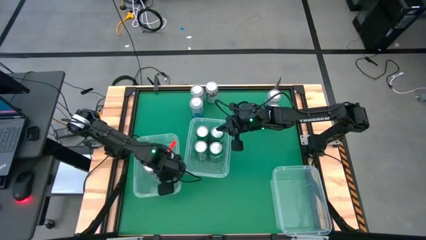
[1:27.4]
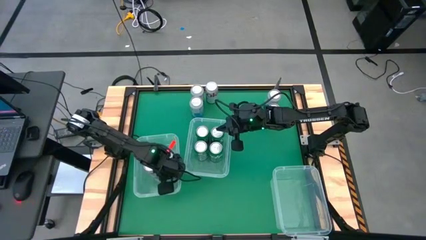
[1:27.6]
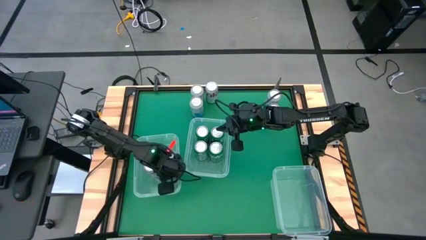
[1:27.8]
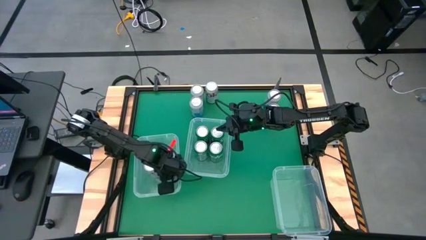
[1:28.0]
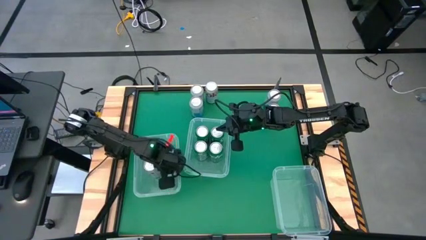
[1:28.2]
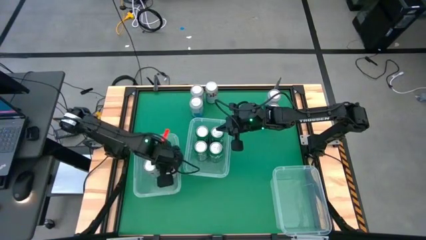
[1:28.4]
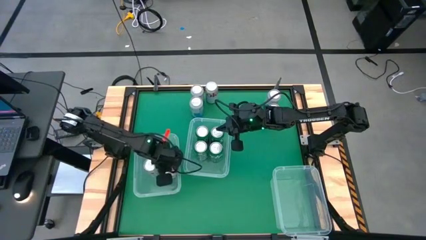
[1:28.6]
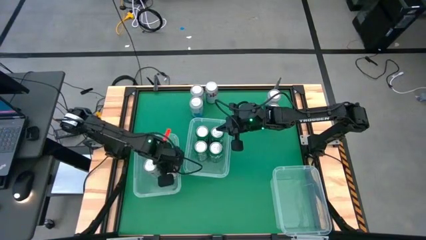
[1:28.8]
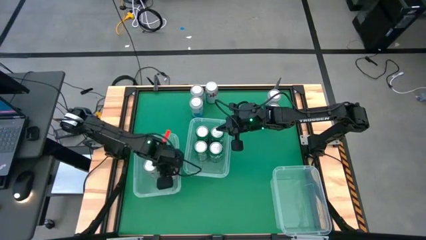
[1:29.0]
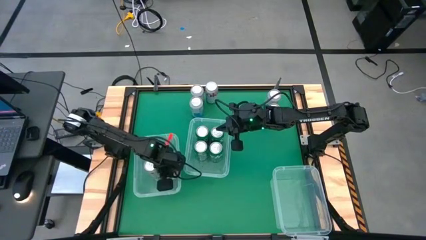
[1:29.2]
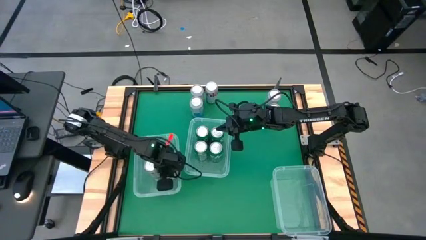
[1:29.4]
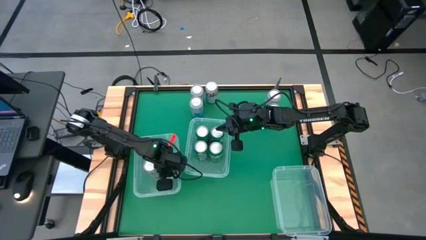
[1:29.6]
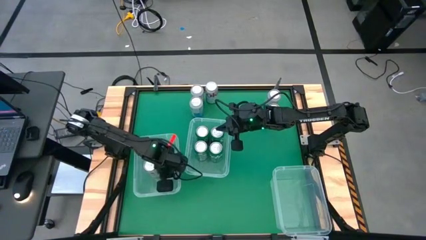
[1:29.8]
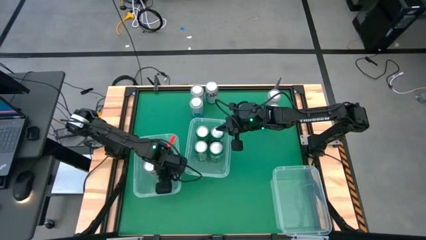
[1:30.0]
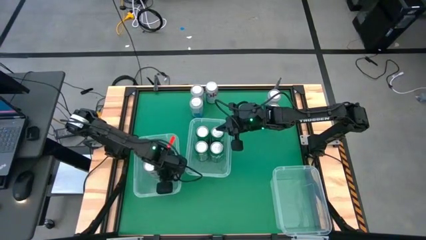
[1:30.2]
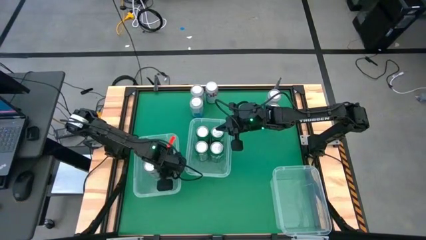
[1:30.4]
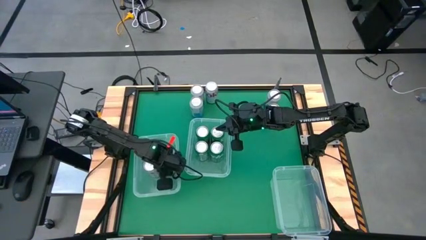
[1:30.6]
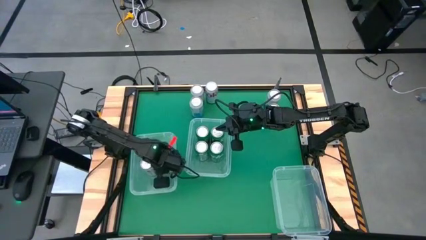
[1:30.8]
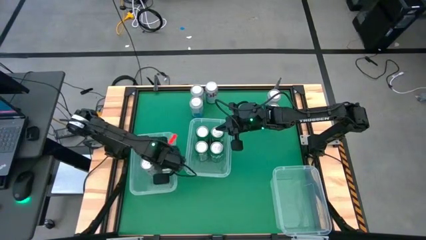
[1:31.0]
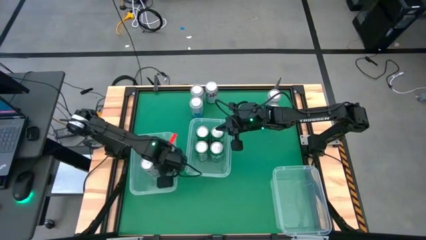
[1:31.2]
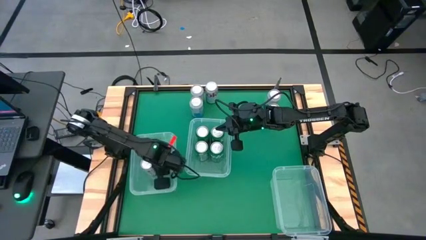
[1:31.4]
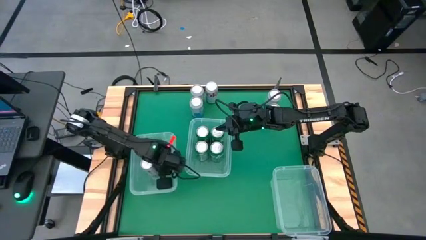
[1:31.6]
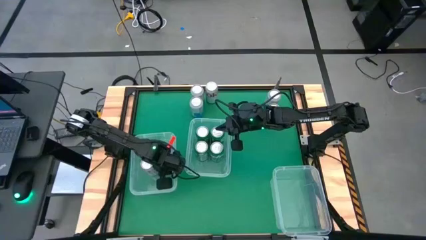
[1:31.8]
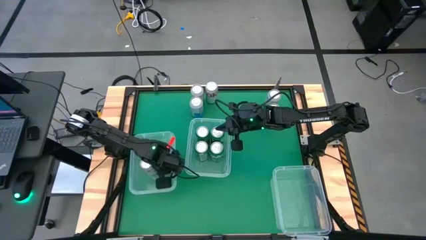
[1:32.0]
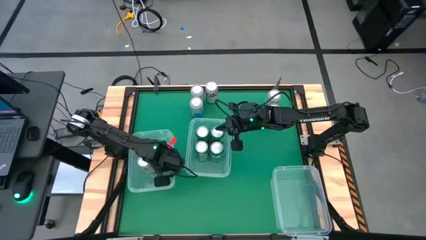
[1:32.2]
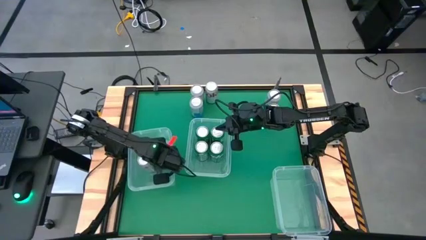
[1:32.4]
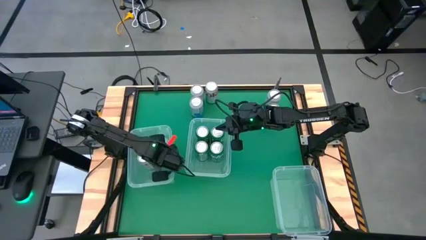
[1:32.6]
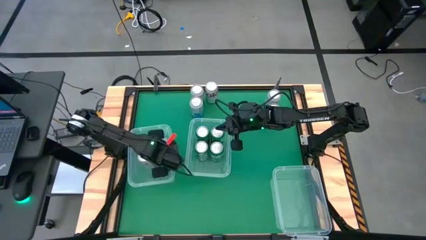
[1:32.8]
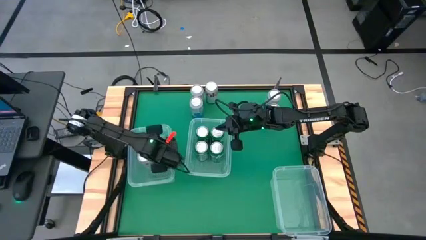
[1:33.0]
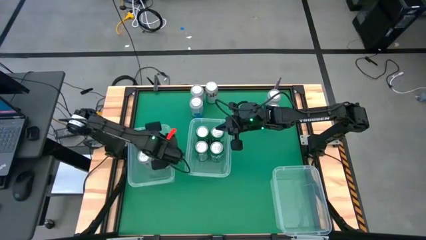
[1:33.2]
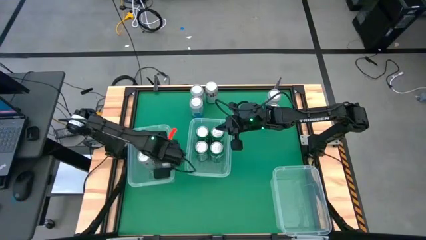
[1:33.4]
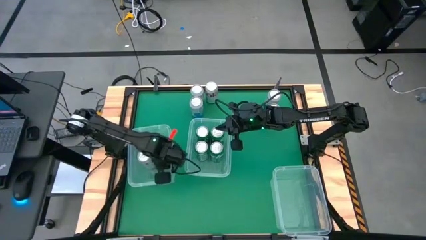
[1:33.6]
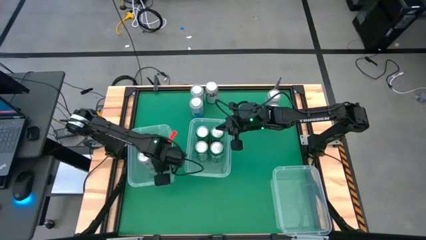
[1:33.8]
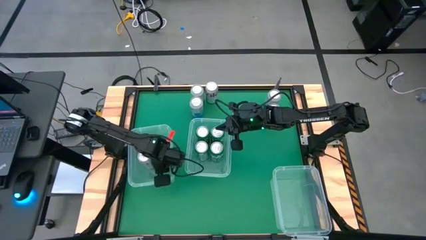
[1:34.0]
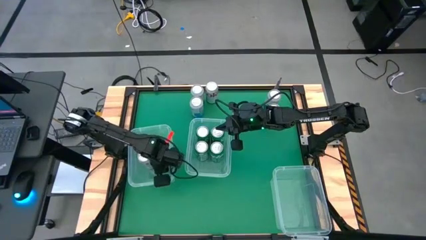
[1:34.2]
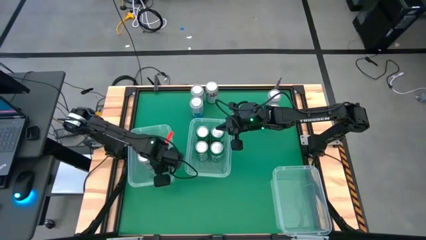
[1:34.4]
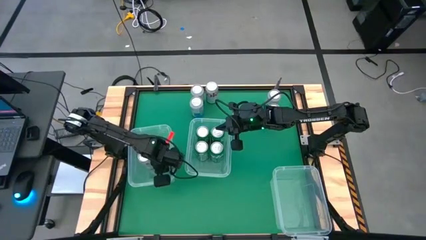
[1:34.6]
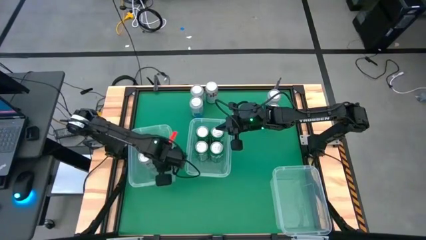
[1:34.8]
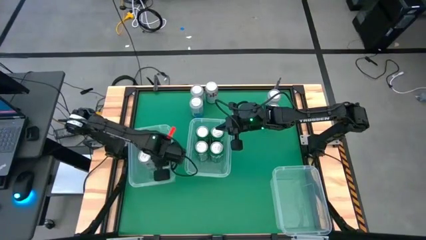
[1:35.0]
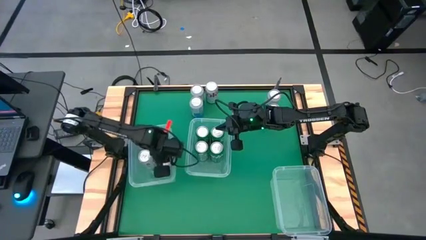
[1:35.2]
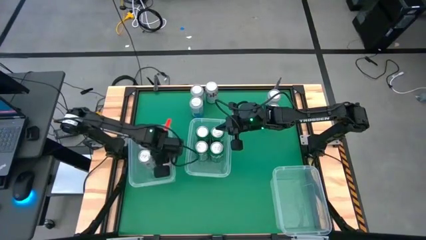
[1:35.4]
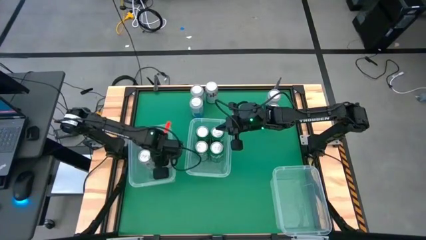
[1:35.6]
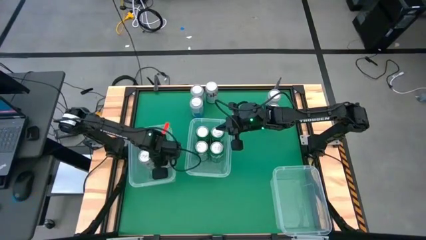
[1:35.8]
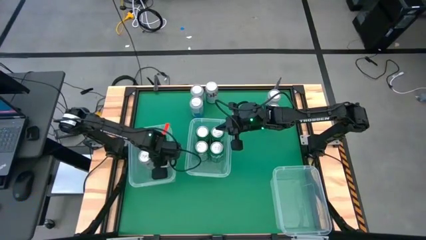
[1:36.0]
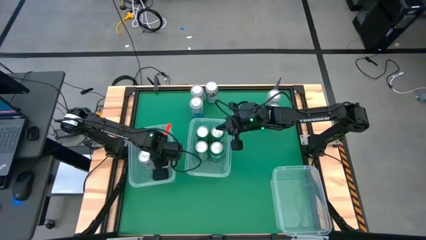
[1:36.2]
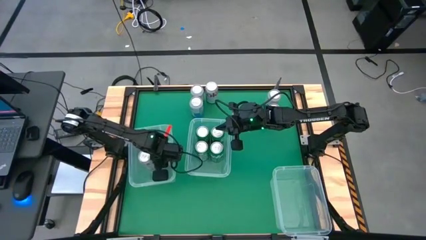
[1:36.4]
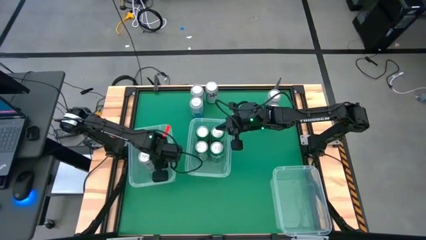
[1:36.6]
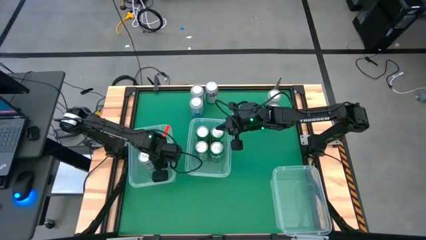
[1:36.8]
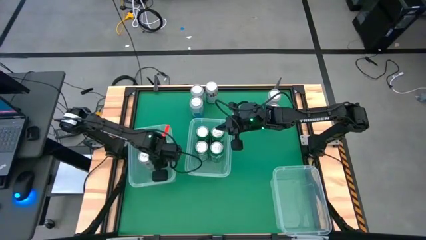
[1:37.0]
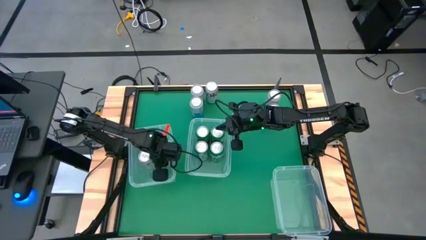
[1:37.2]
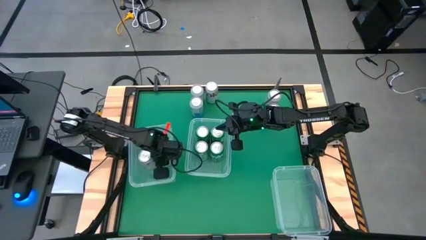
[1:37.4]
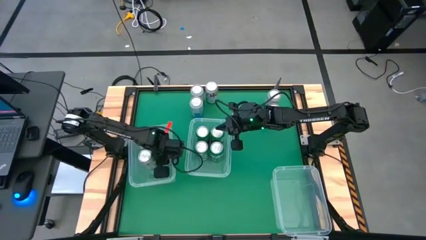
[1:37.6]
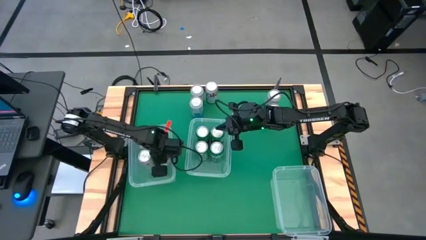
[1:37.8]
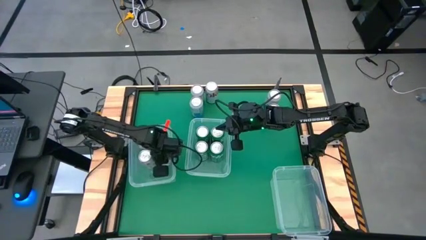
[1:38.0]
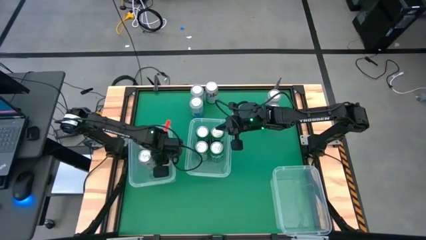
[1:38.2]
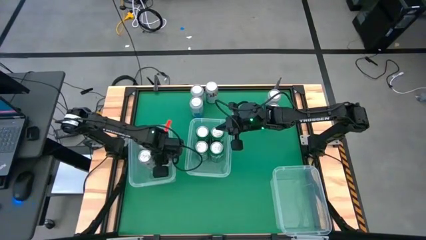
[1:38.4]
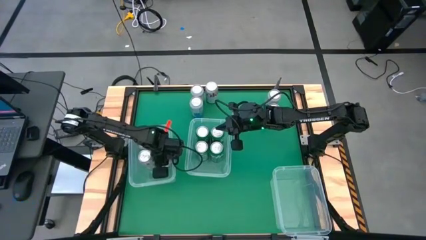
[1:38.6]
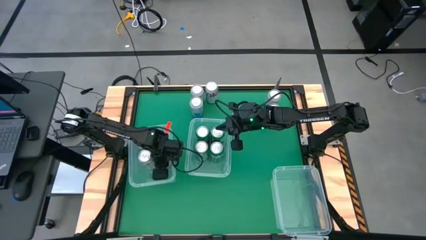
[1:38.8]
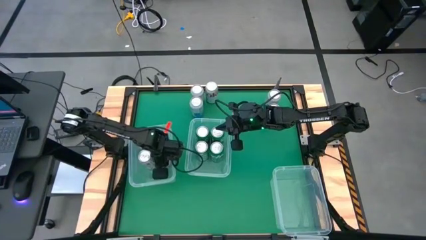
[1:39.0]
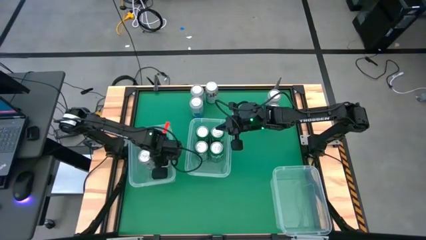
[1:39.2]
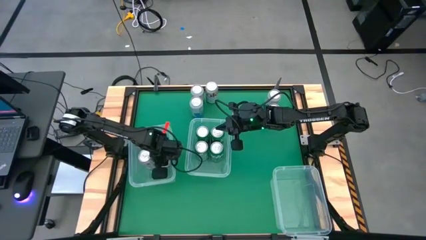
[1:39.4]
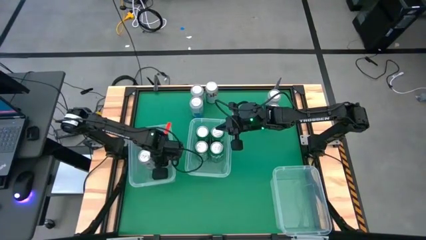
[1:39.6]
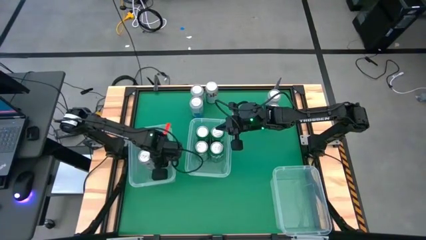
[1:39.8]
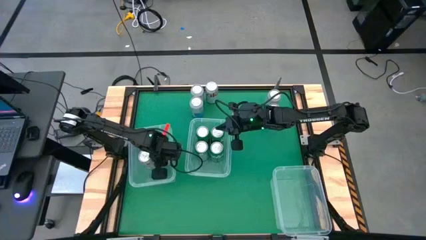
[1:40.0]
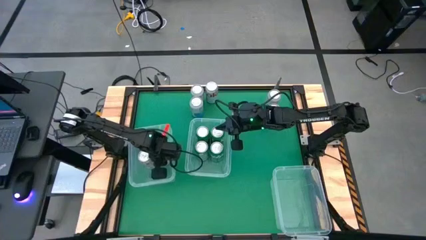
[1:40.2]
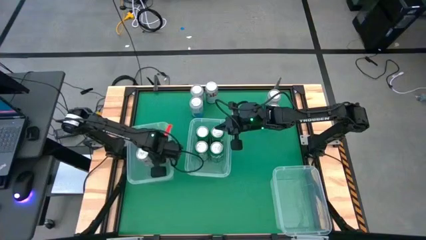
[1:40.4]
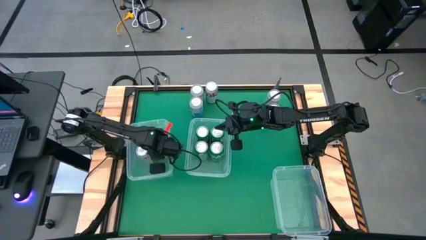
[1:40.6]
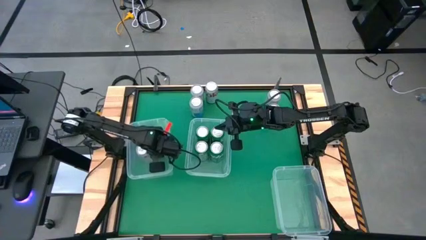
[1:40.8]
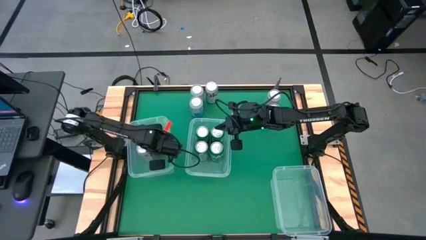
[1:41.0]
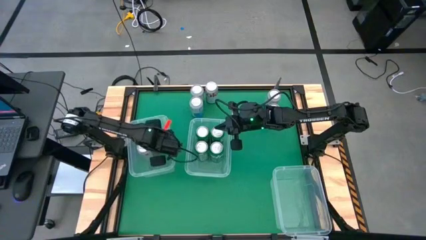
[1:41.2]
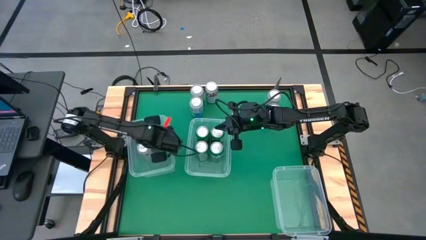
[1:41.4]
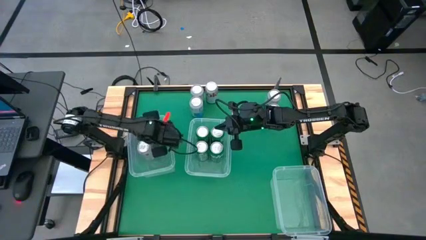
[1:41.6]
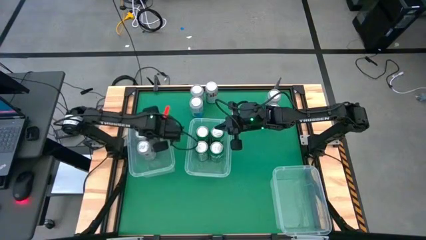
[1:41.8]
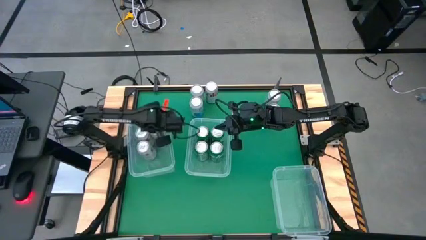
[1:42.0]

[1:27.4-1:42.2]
Task: Sort soda cans
Put the silver soda can into the button left bin

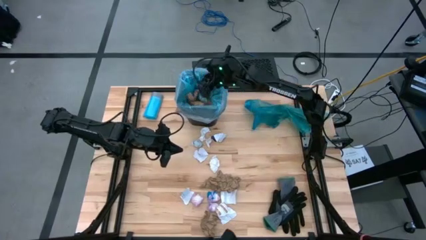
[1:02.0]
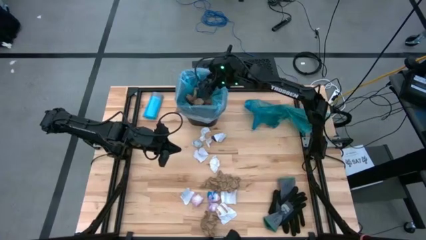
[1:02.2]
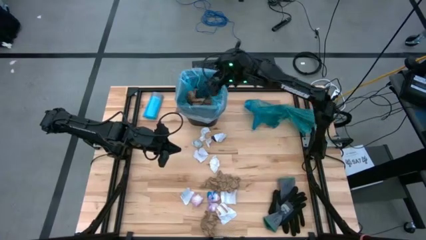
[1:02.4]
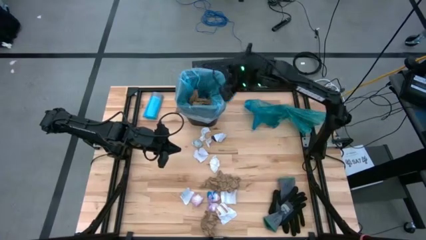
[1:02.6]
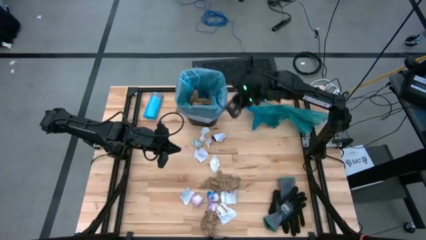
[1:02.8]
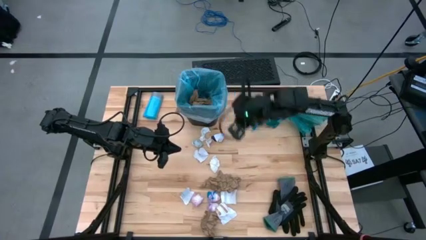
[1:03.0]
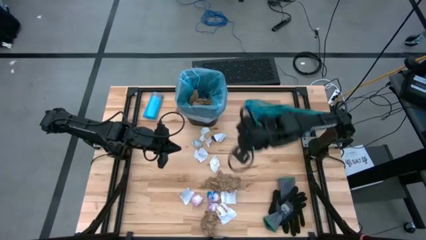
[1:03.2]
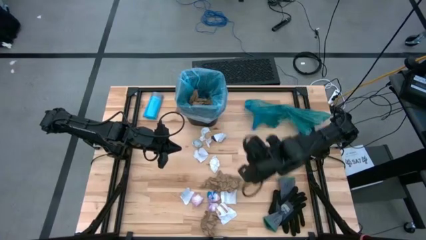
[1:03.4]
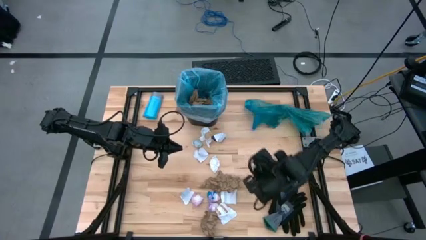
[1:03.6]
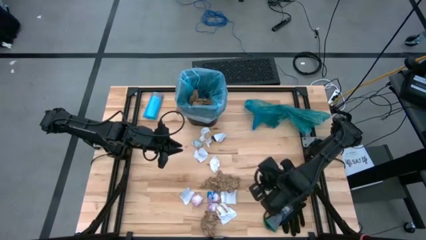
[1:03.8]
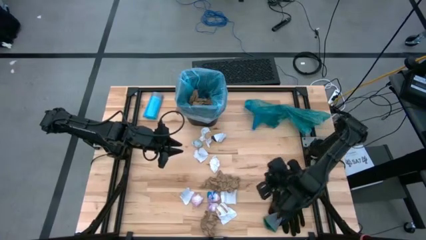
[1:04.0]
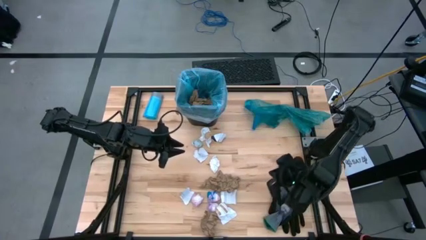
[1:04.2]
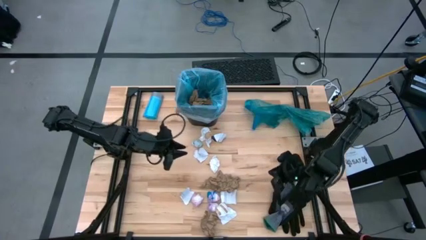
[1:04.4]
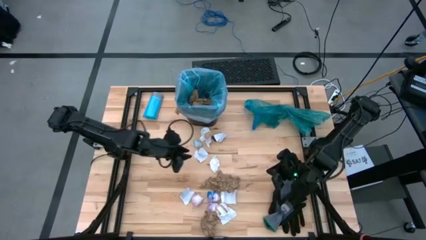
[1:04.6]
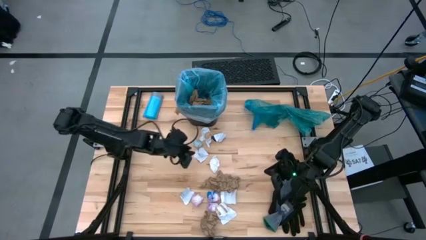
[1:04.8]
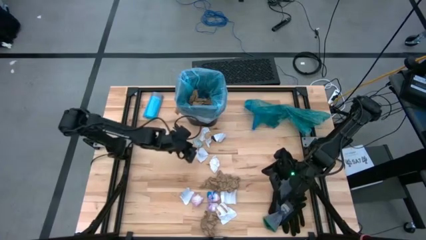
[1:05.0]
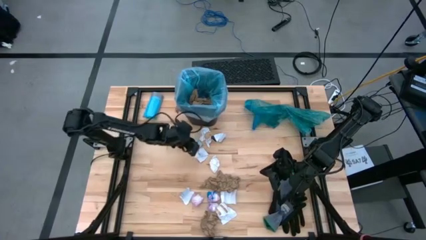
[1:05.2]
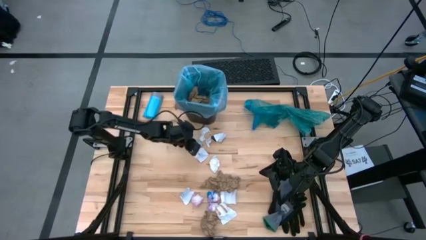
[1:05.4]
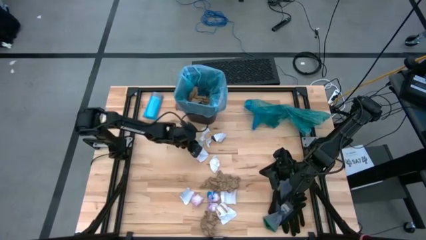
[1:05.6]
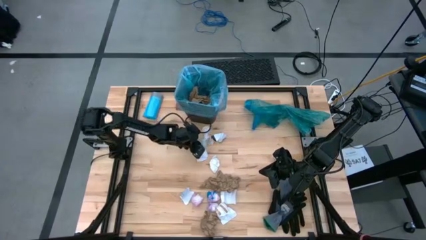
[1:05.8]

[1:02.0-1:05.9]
Task: place trash/remove bag and relplace
Put the blue plastic trash into the trash bin
